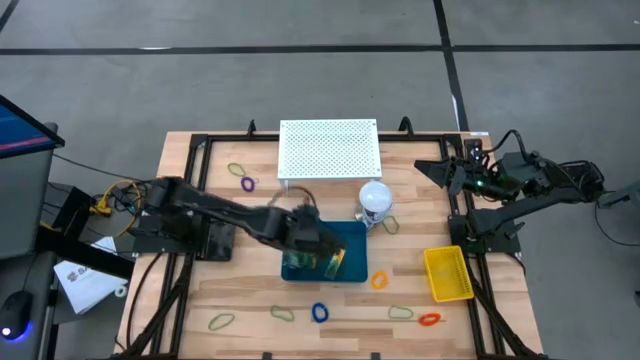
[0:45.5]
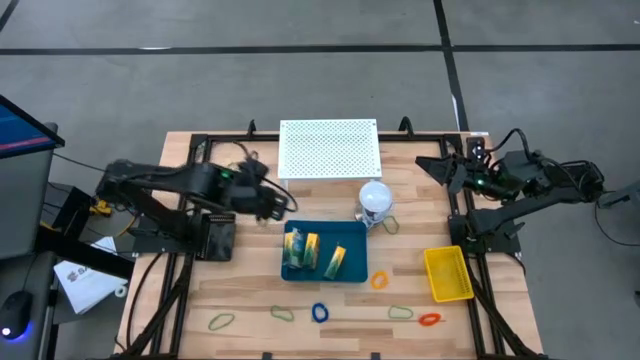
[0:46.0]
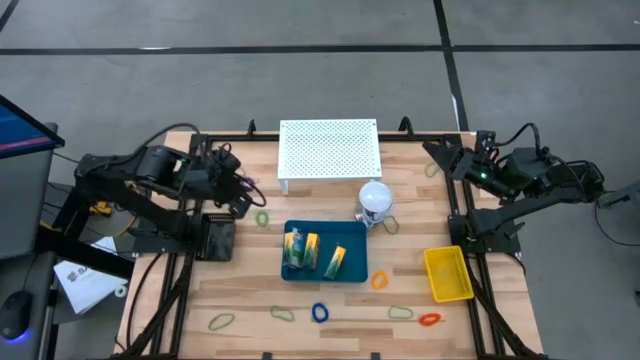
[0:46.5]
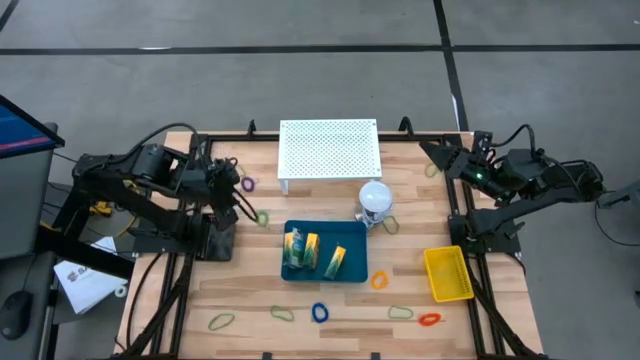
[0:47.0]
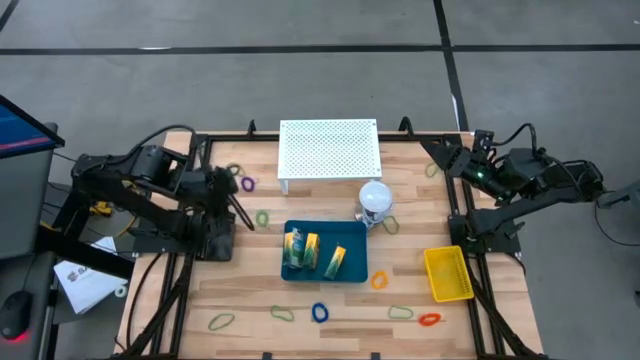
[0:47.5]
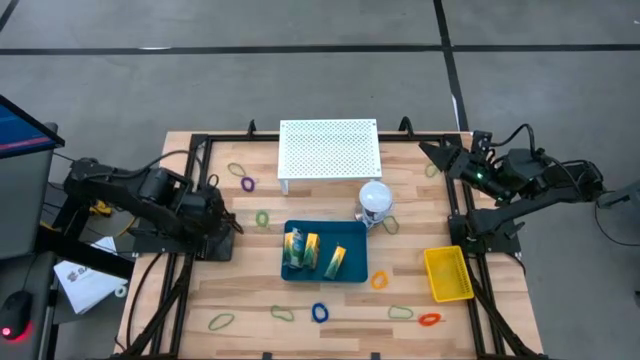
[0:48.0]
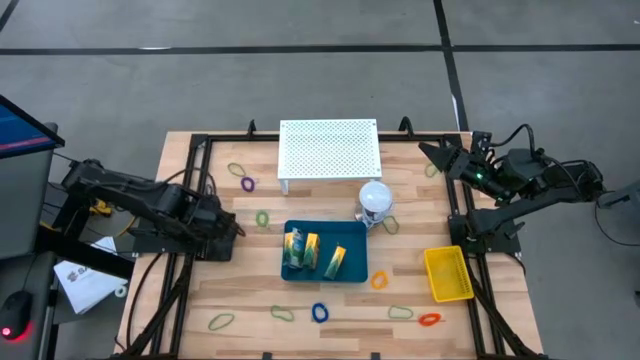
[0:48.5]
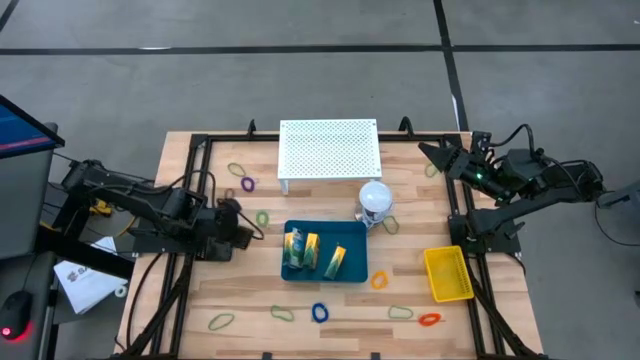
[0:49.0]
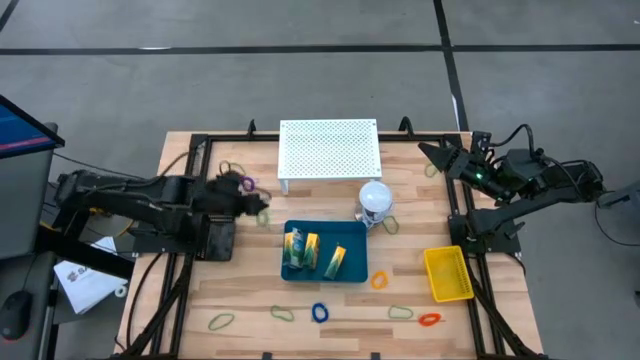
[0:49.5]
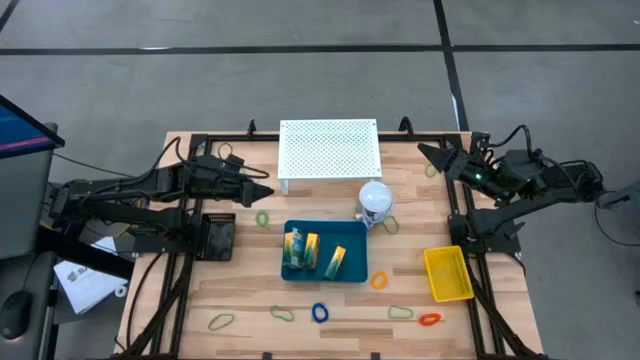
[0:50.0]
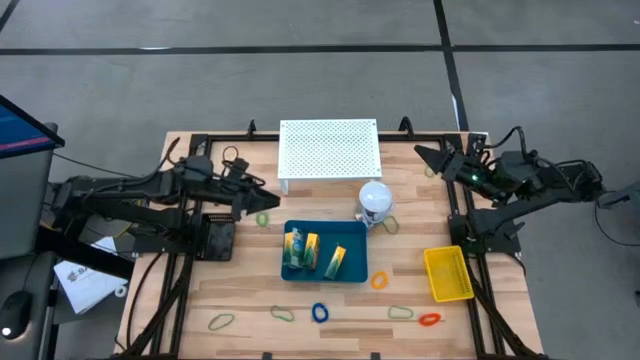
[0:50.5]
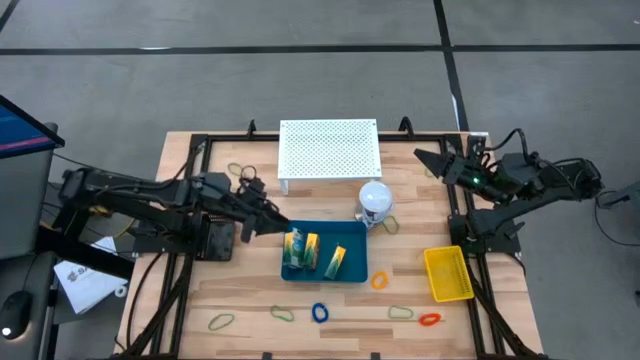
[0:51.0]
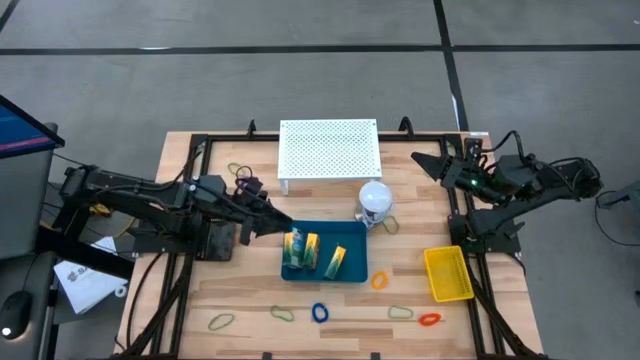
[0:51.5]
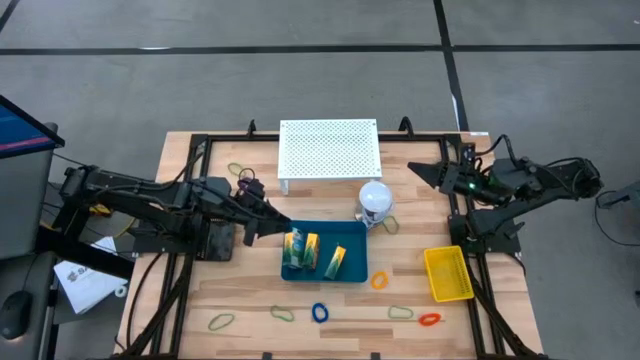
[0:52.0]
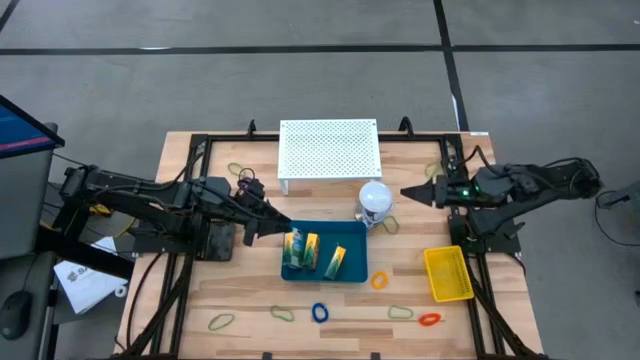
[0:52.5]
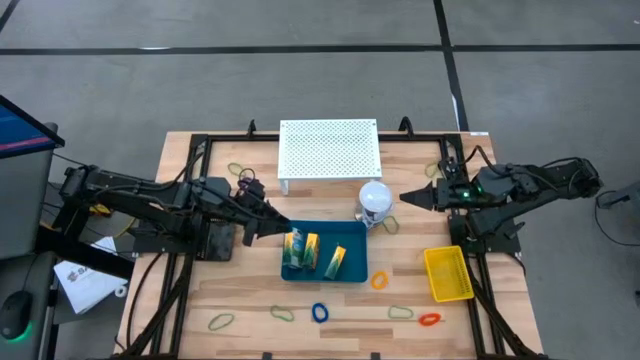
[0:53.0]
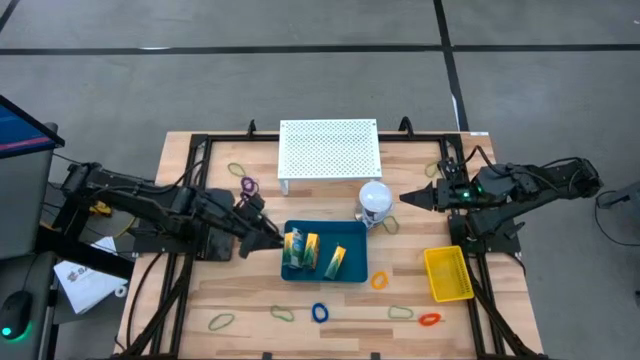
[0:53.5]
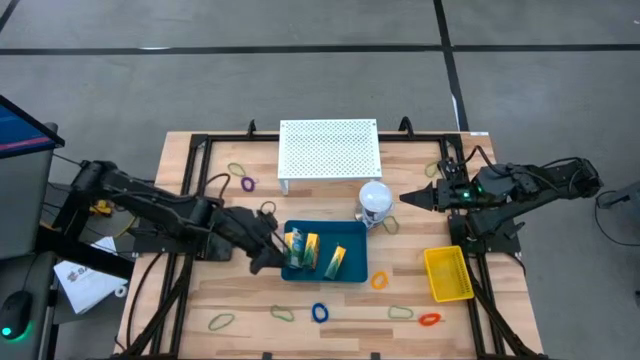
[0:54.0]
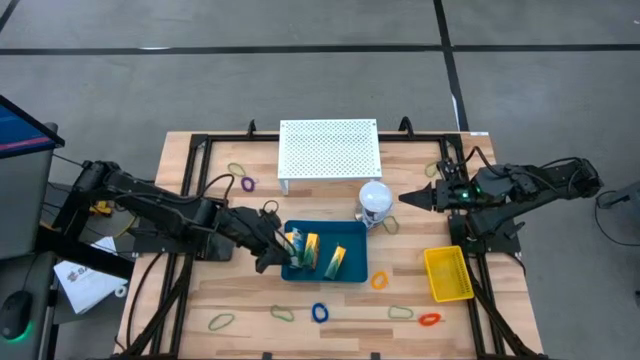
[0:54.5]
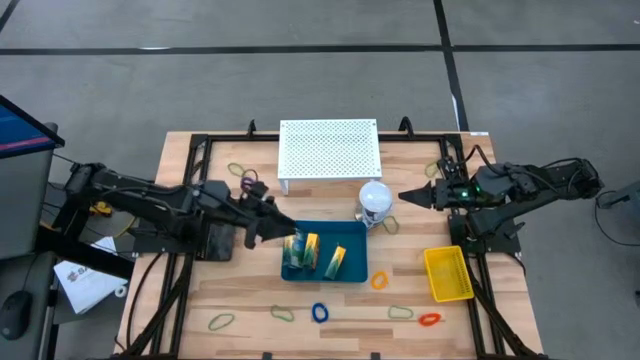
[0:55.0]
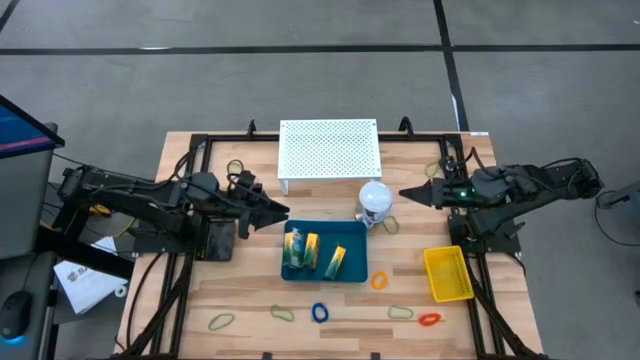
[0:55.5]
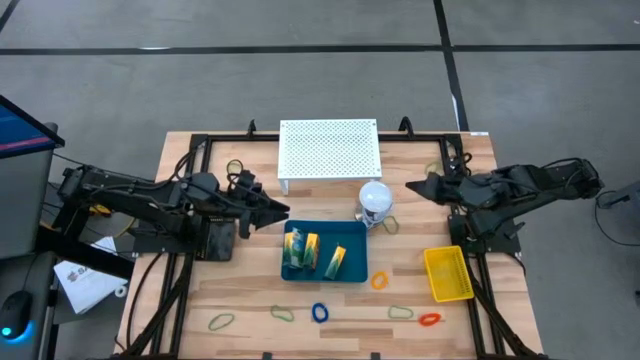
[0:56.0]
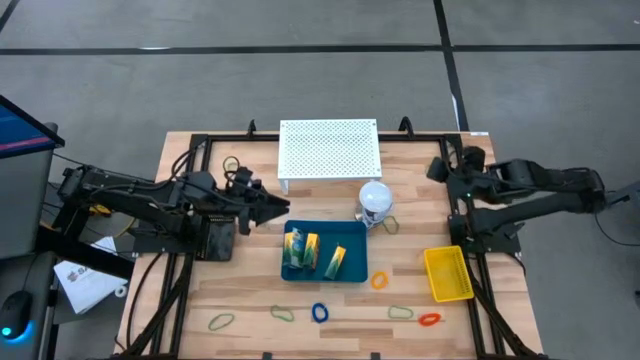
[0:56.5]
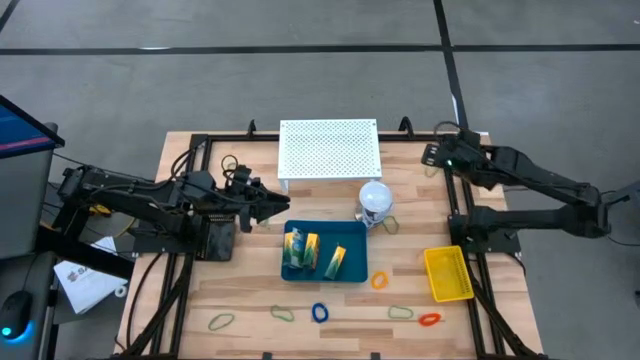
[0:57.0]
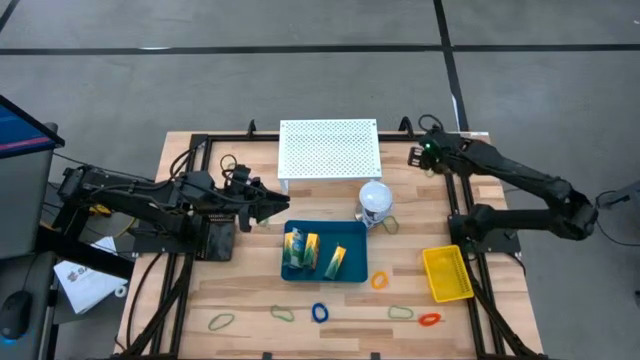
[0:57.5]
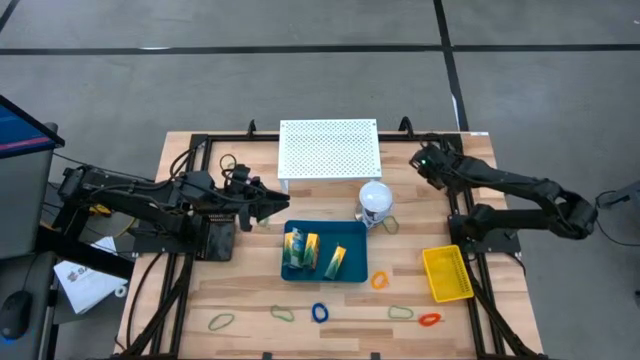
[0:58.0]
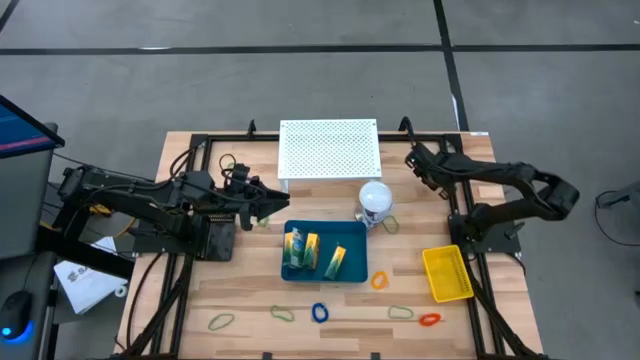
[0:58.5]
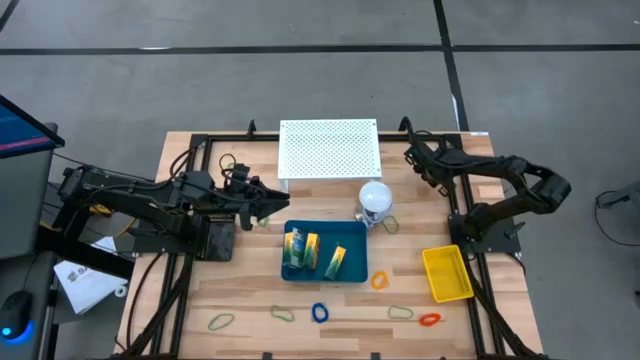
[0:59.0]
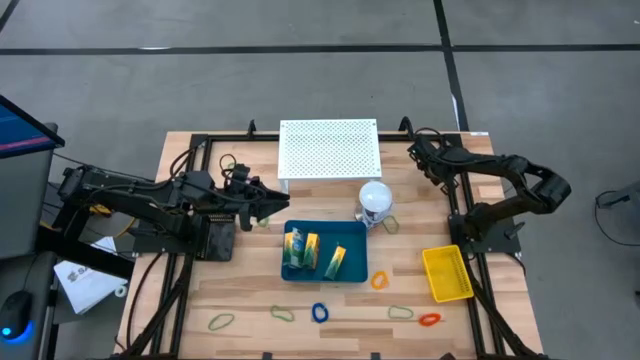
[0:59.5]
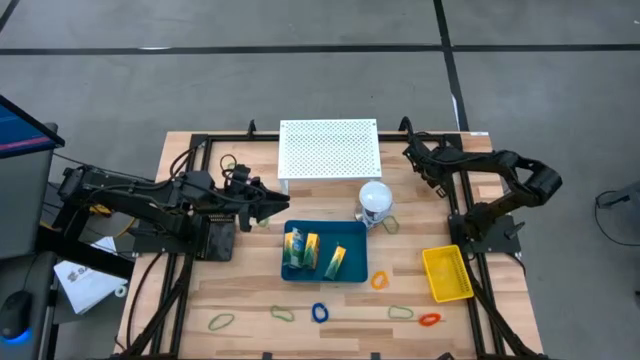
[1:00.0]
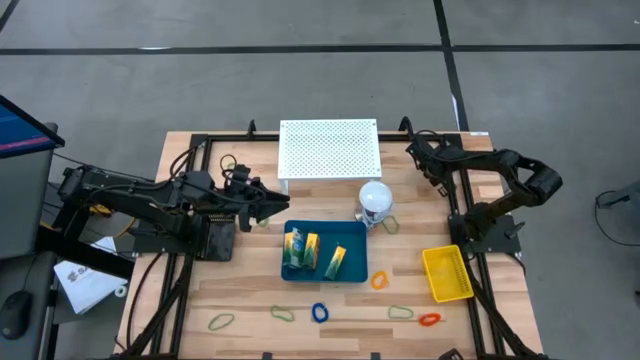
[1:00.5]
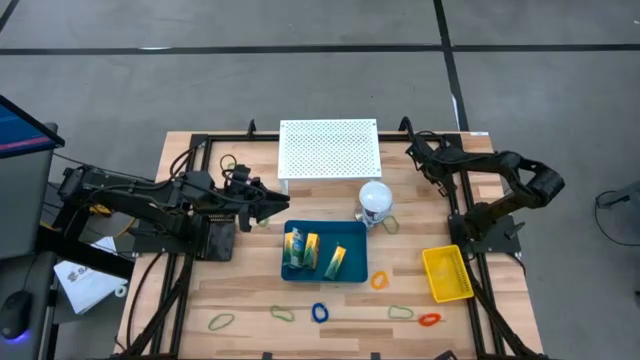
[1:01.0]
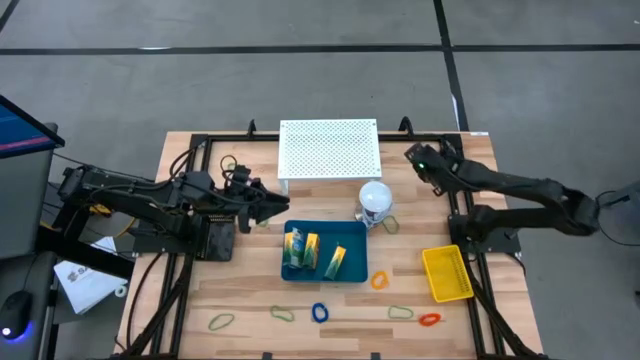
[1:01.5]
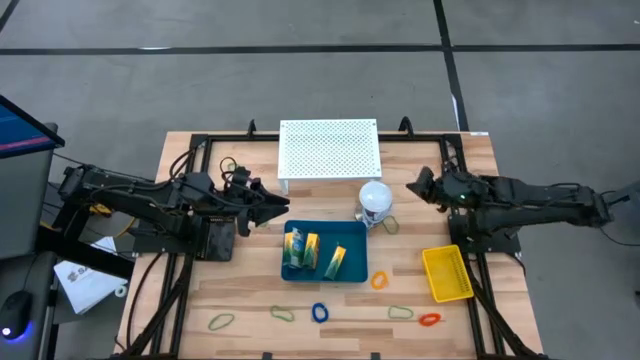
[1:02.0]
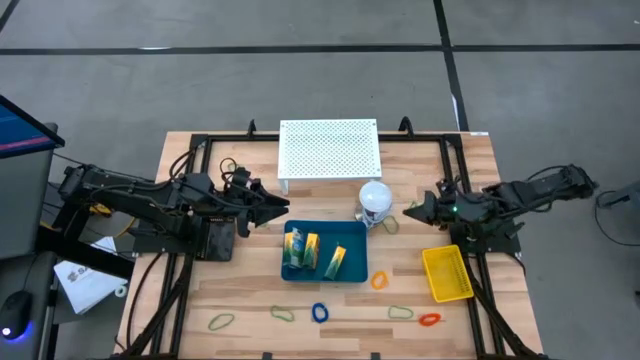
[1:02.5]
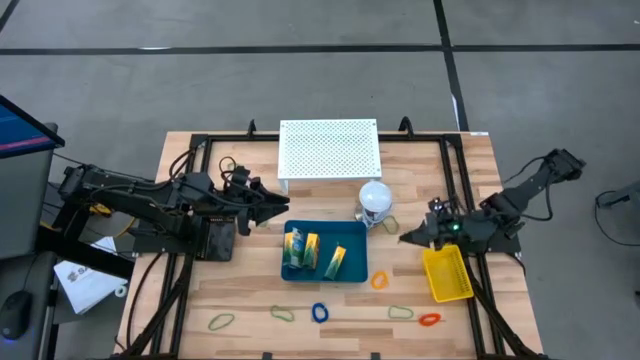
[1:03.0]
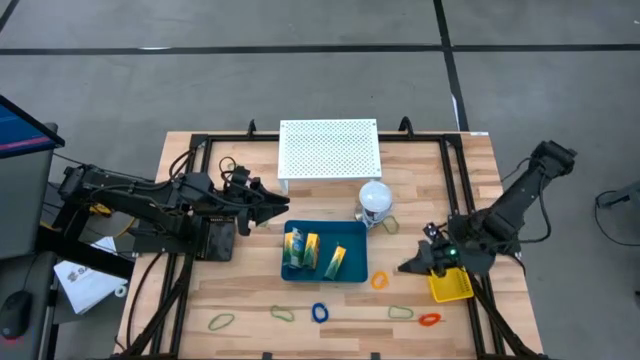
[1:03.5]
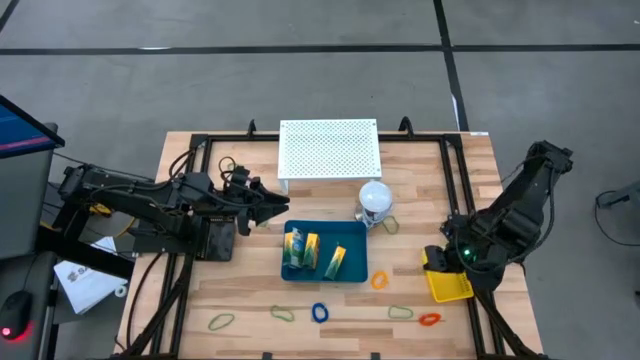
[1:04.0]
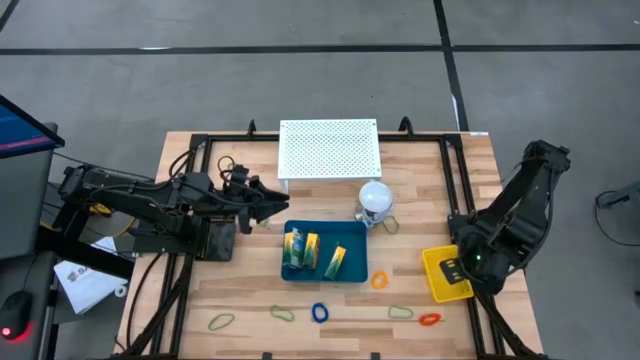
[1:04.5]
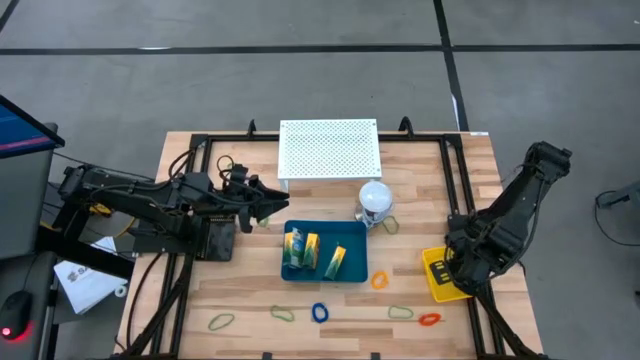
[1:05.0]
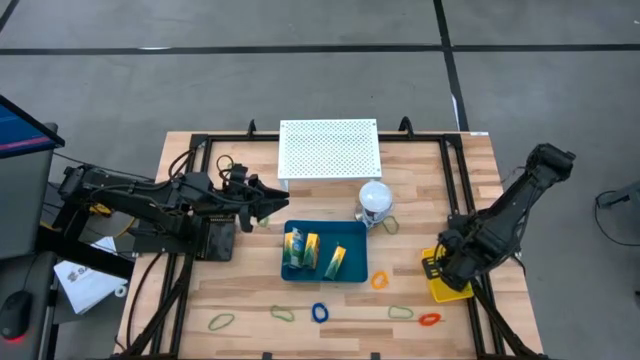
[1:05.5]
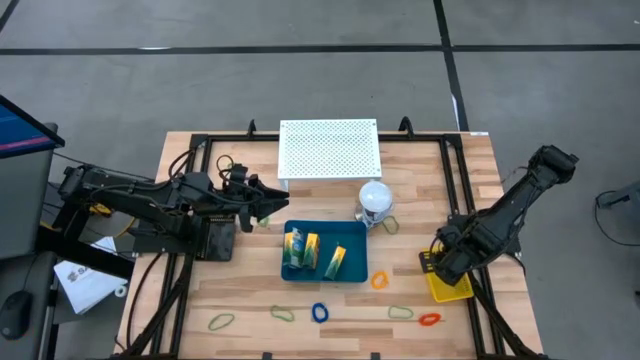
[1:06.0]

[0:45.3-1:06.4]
Task: Pick & Place Office Desk Supplies
Put the green rubber band into the yellow bin

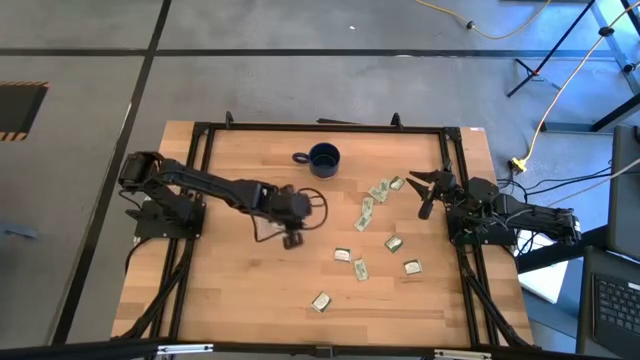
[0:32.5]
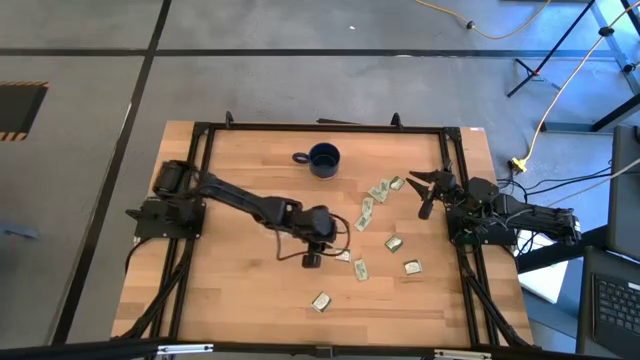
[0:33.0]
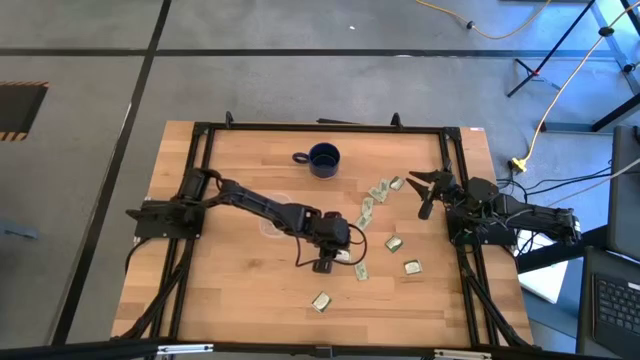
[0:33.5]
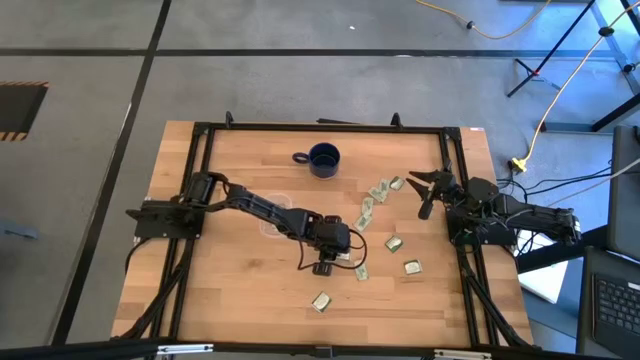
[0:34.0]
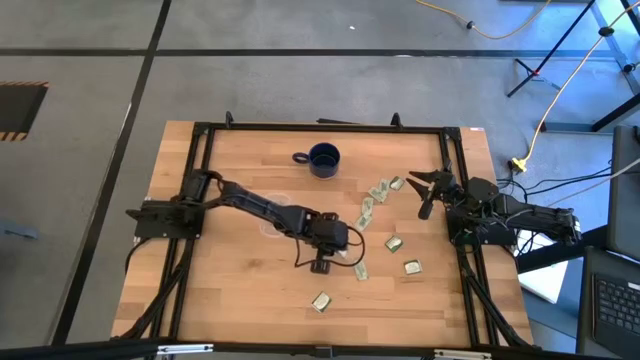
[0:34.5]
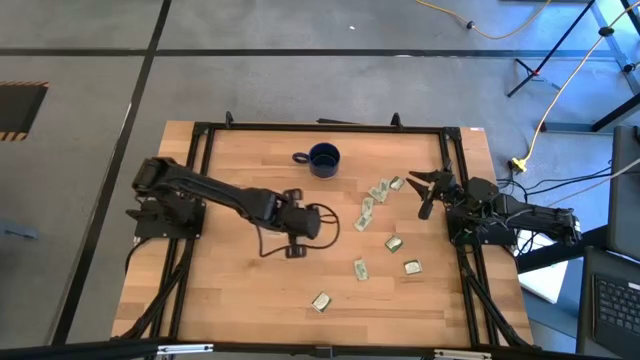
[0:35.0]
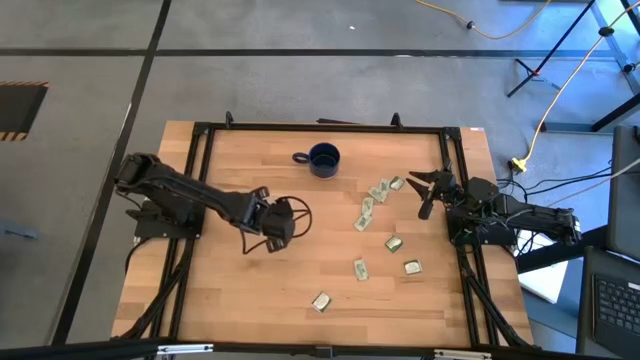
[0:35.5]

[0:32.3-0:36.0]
Task: Pick and place Stevia / Truvia into bins
Put the green stevia packet into the transparent container
